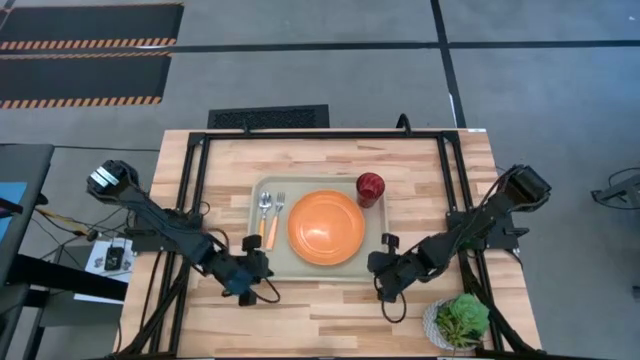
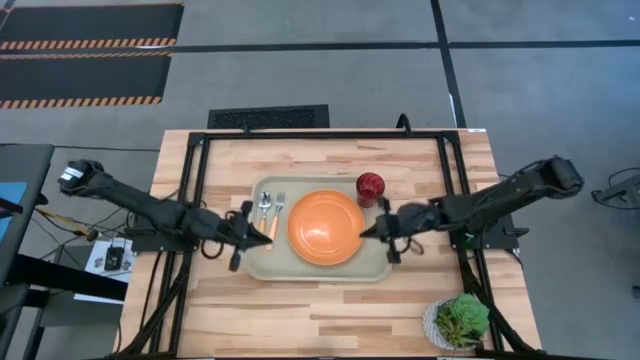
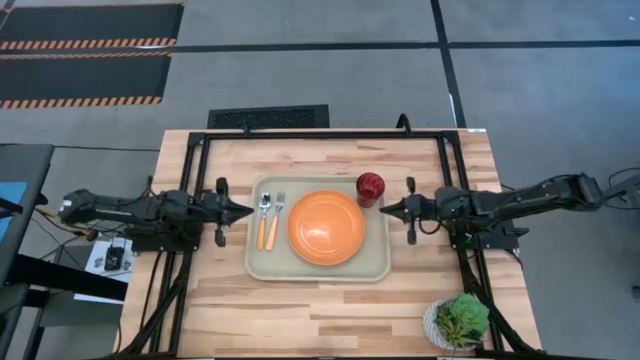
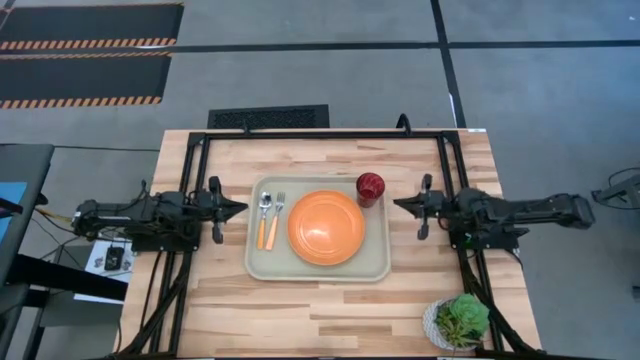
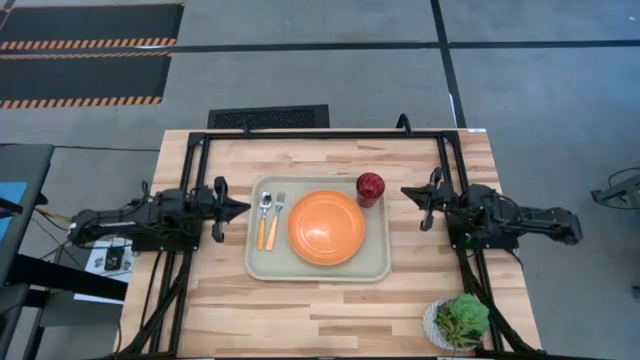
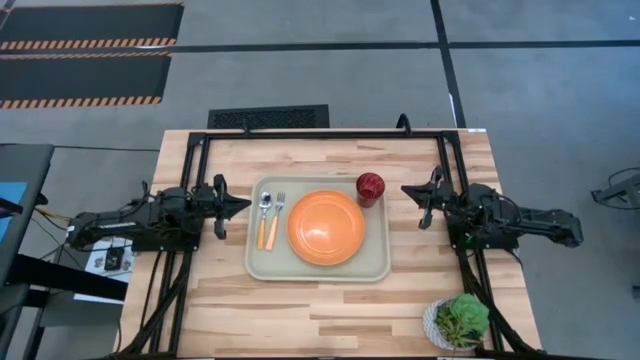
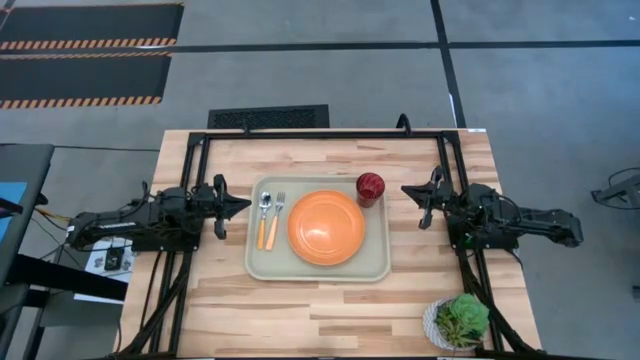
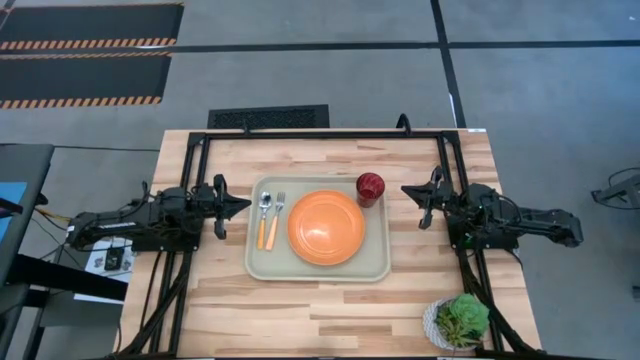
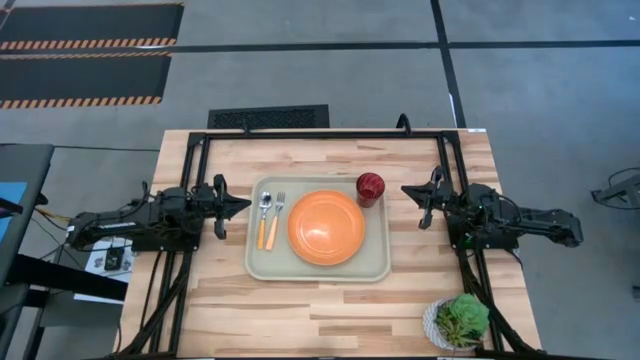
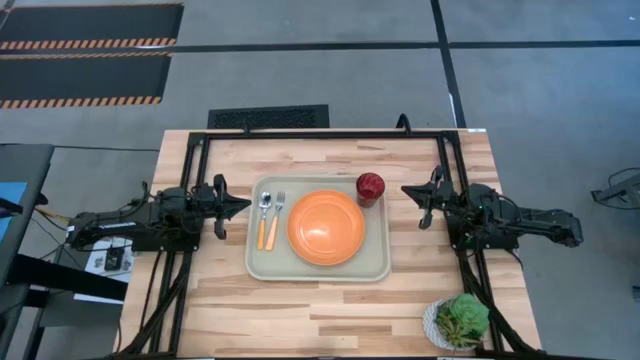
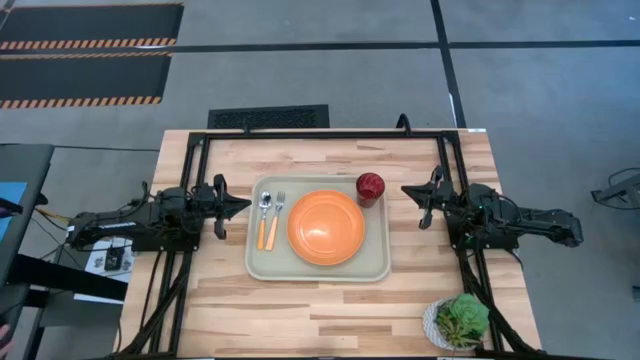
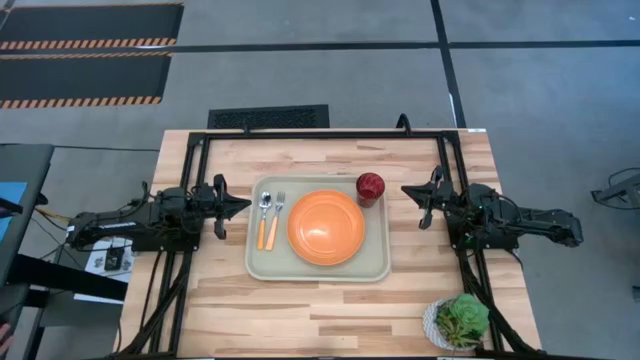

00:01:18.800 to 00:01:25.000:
Task: Pick and place plate/cup/fork/spoon on tray
Return to Home Position

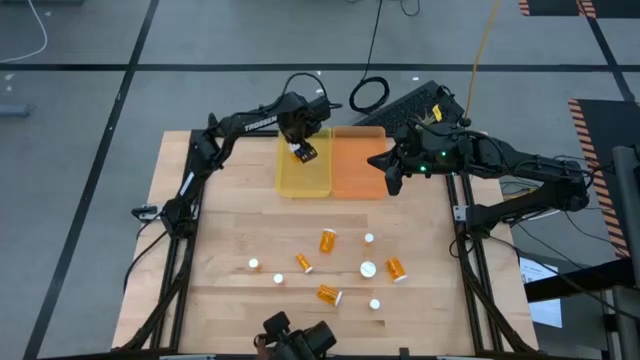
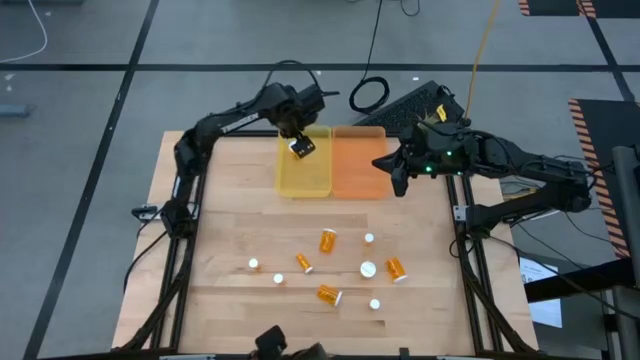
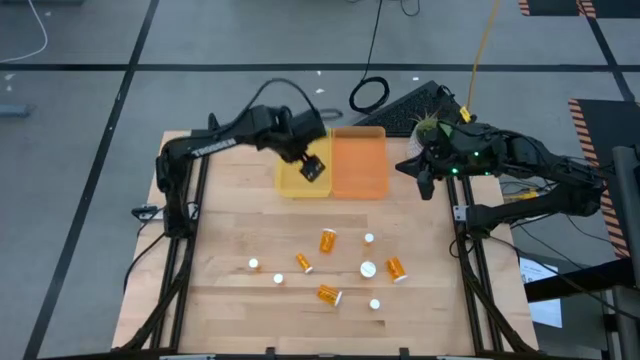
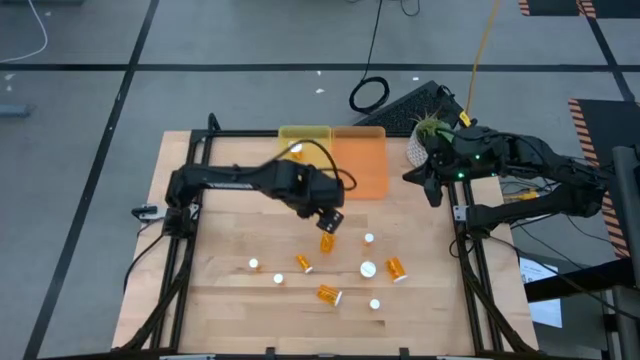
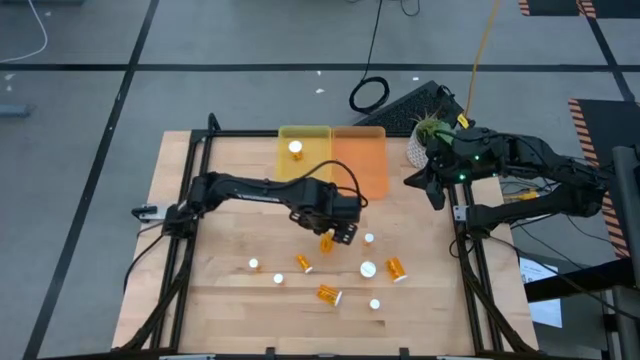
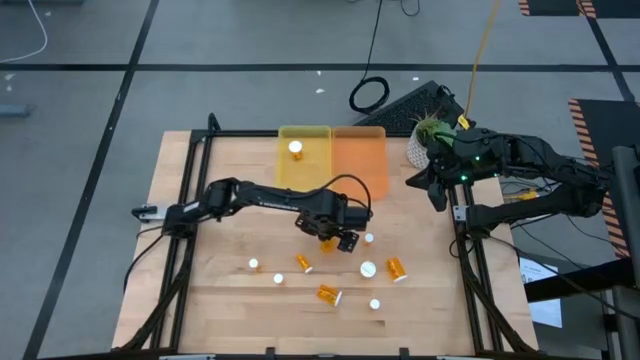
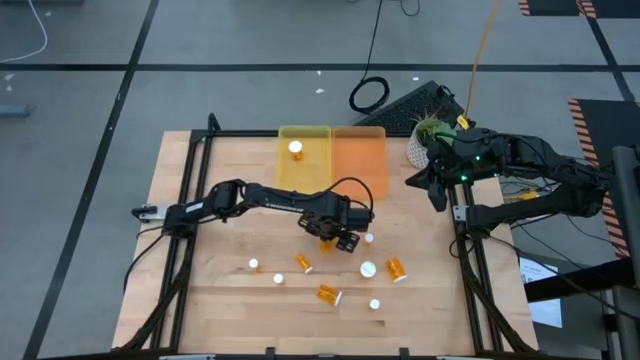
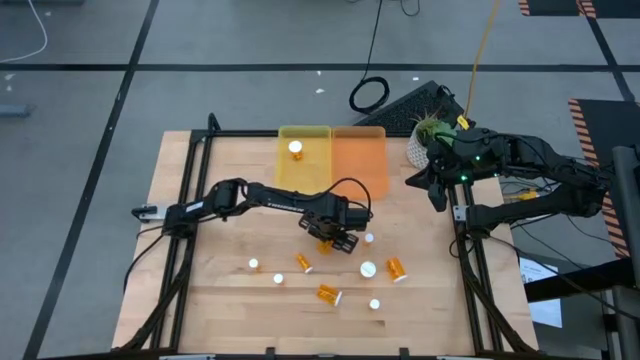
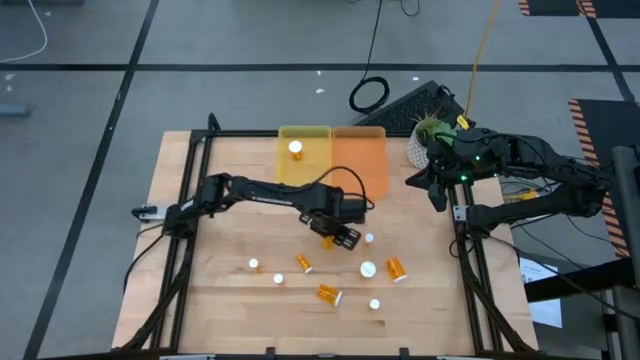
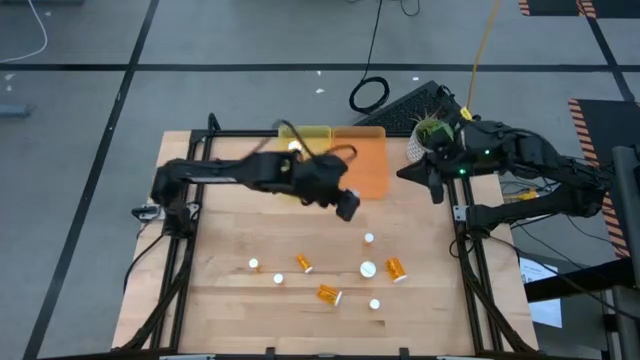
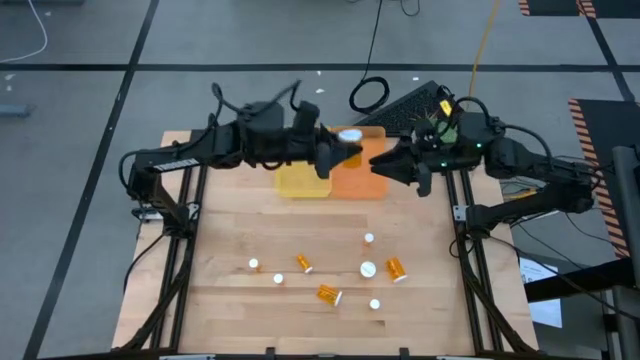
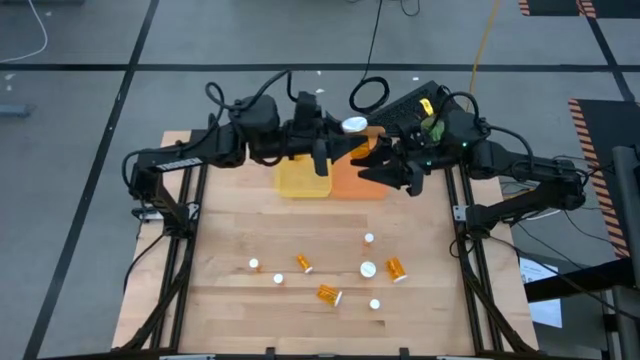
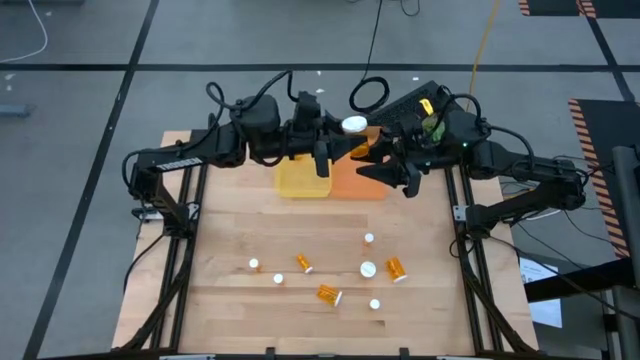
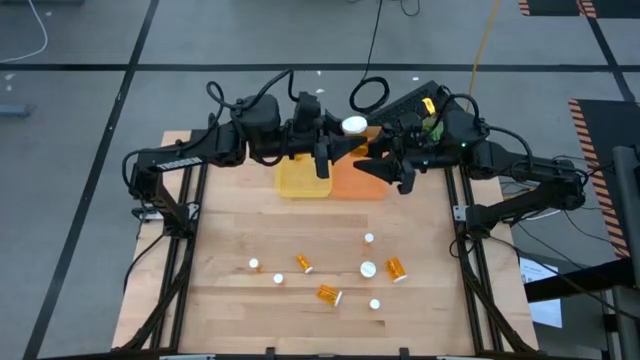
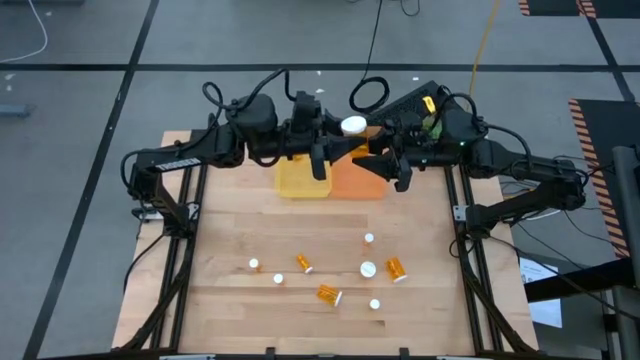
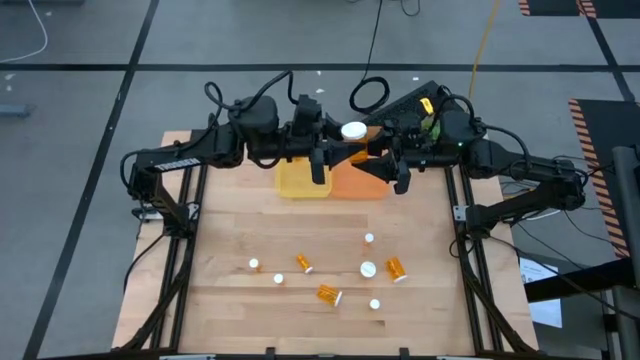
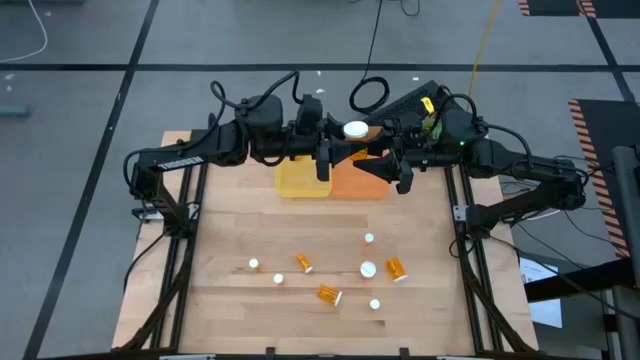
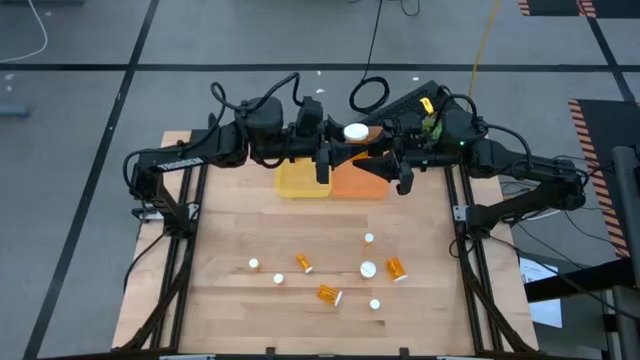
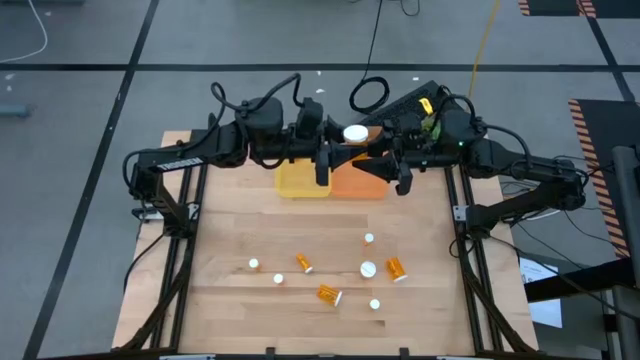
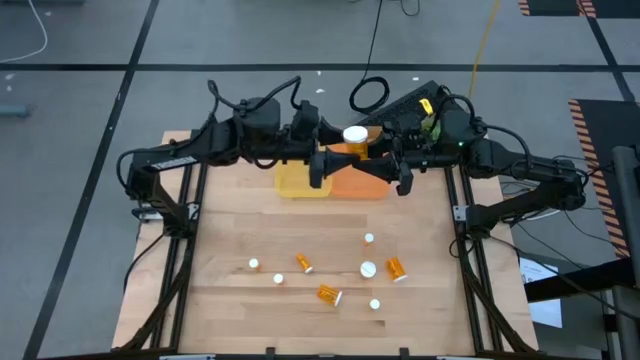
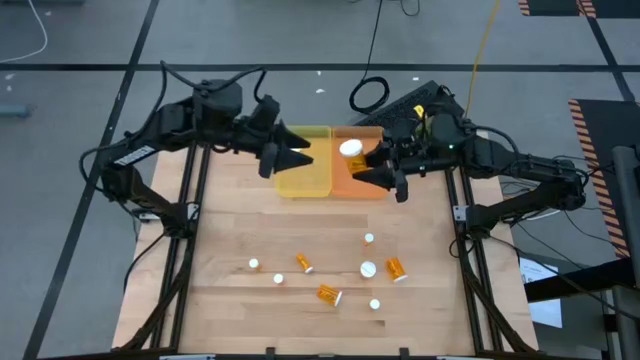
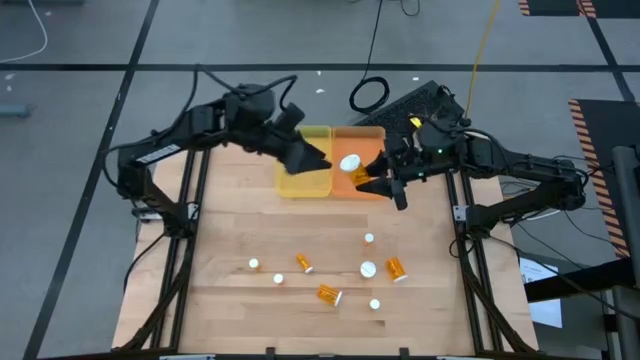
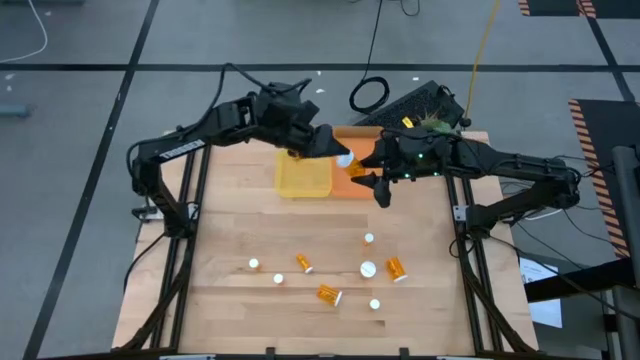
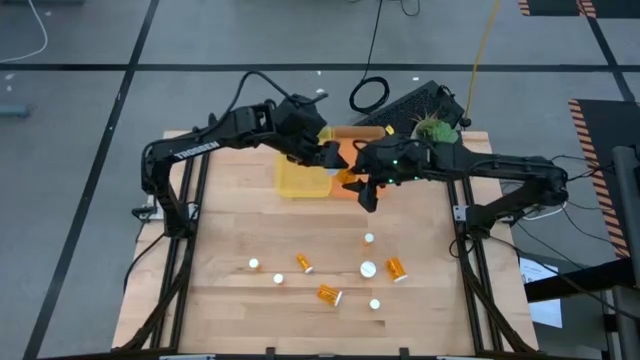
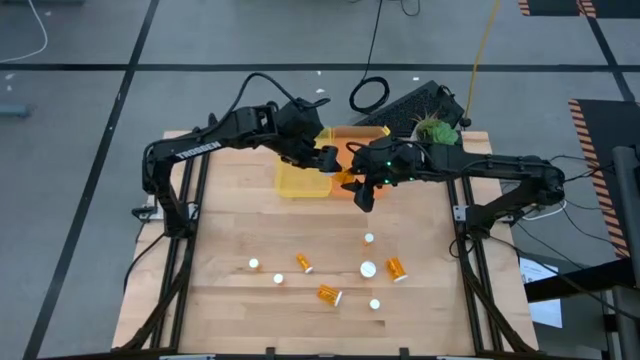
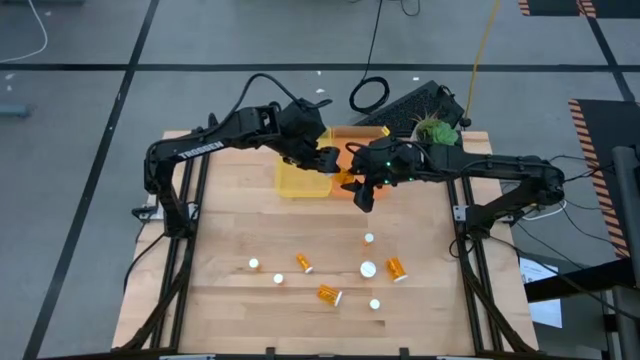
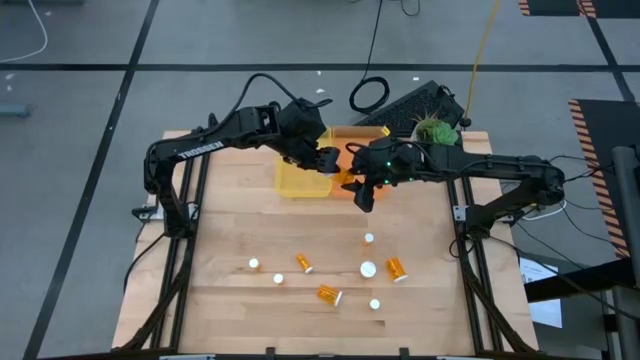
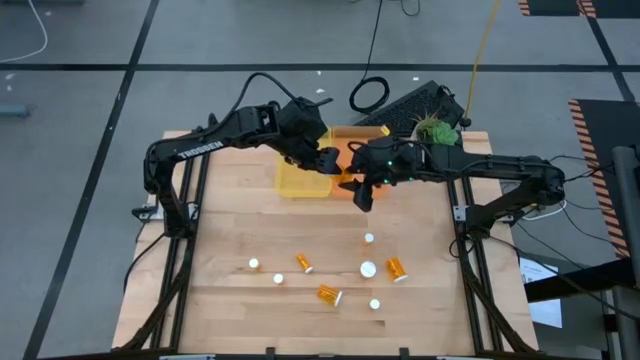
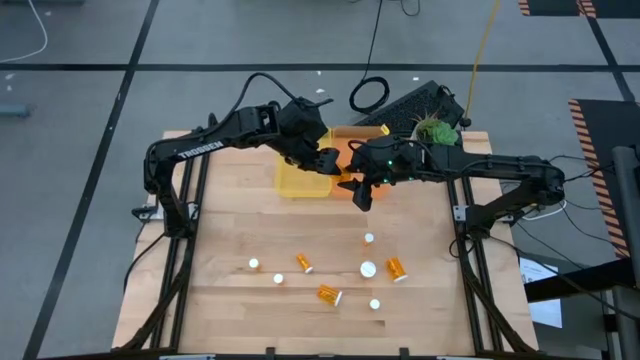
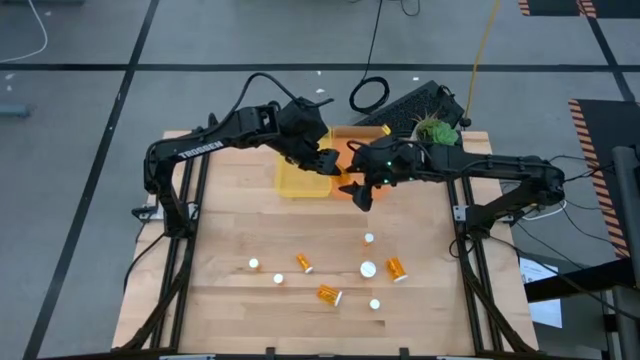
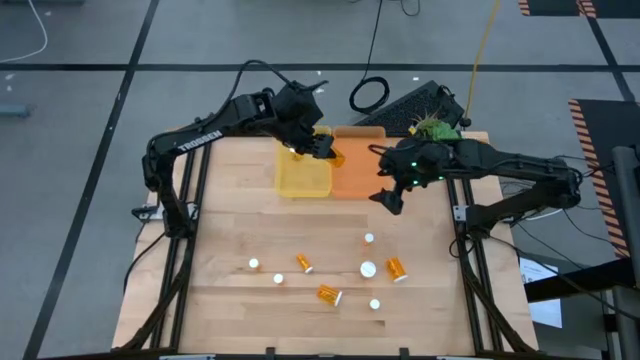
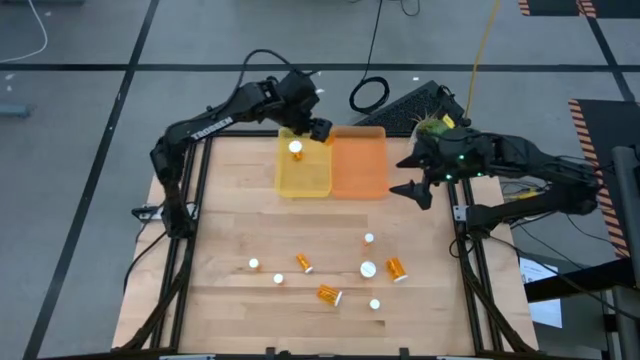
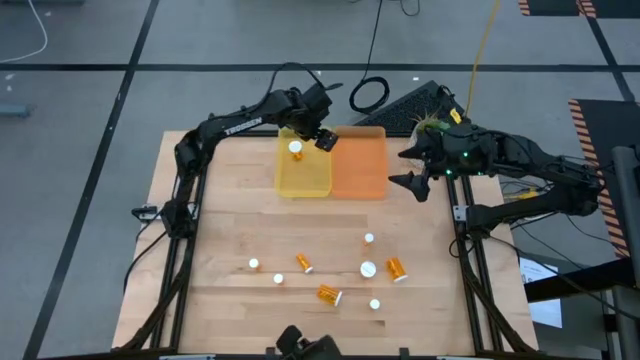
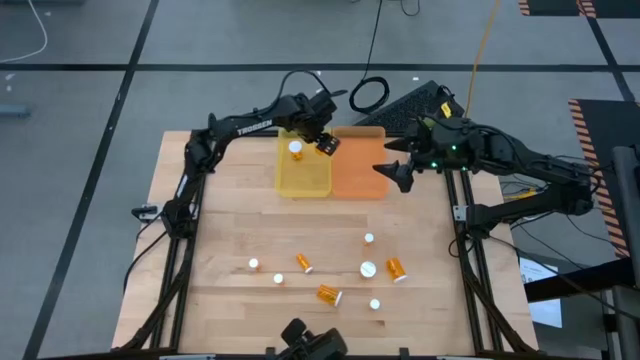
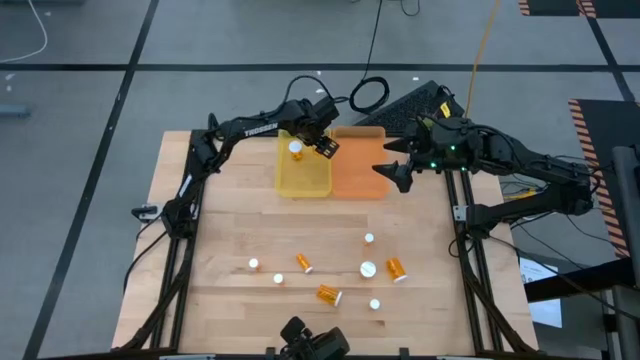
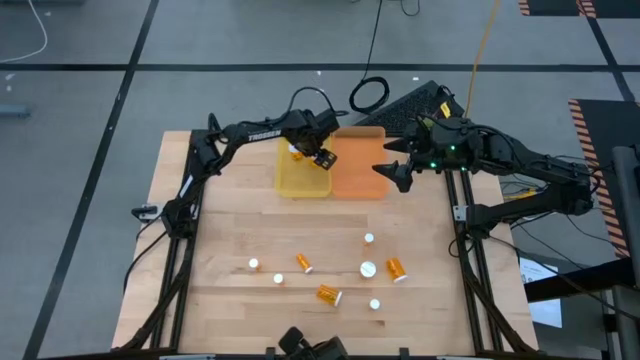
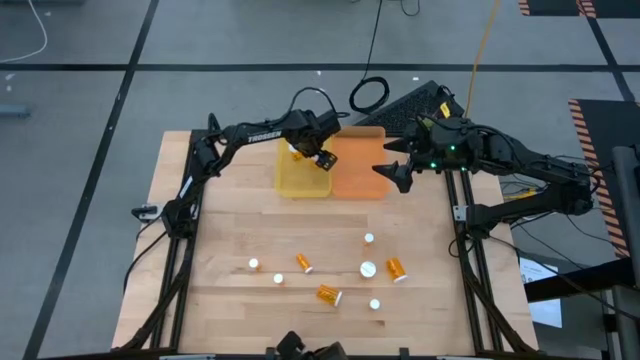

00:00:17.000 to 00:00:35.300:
Task: Pick and place medicine bottles into bin by pill shape (circle, oval)
Put the large orange capsule bottle into the yellow bin
